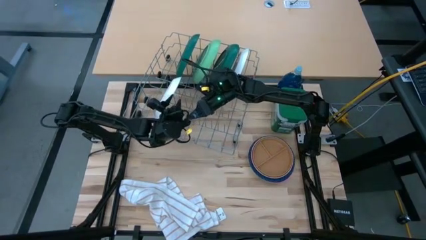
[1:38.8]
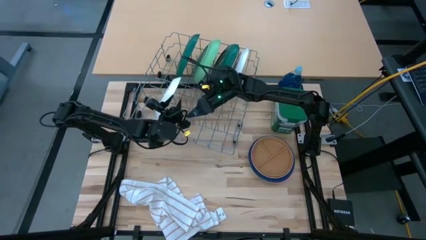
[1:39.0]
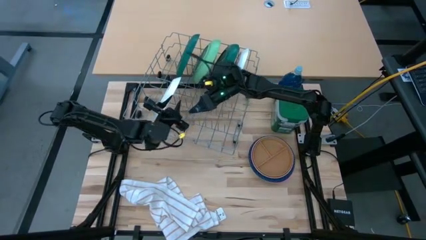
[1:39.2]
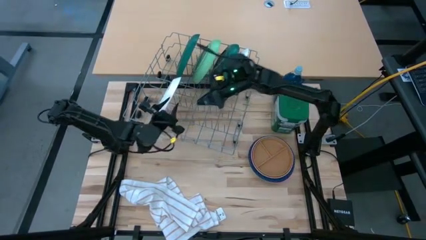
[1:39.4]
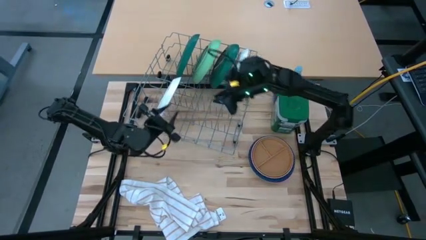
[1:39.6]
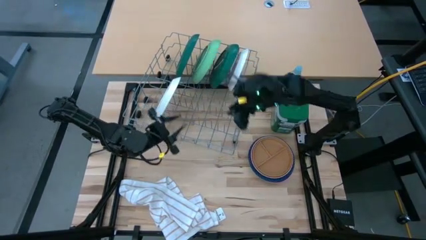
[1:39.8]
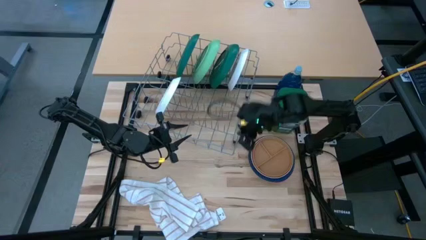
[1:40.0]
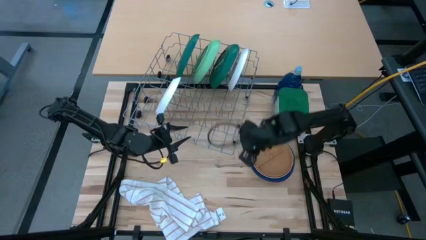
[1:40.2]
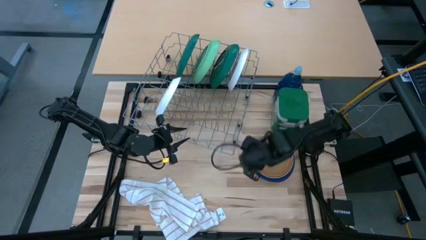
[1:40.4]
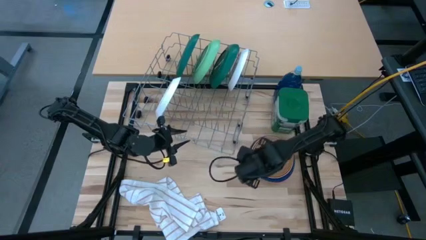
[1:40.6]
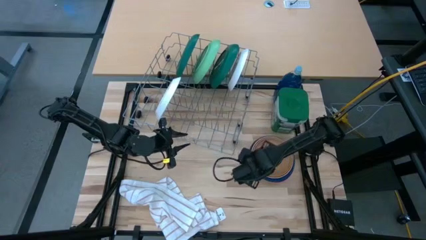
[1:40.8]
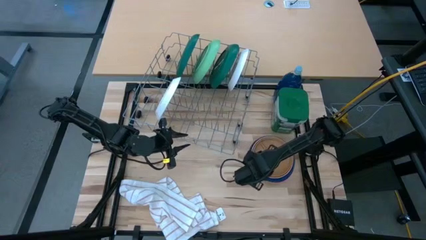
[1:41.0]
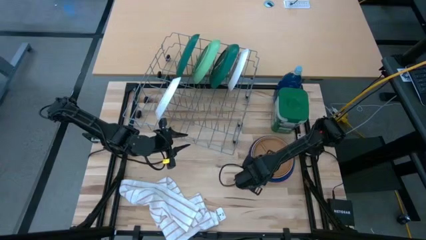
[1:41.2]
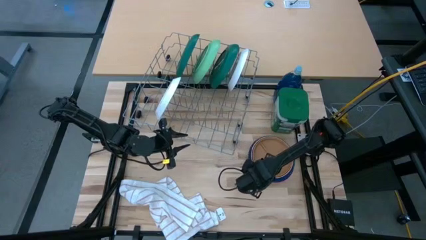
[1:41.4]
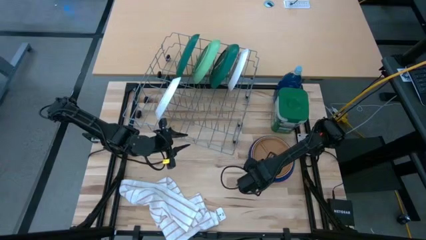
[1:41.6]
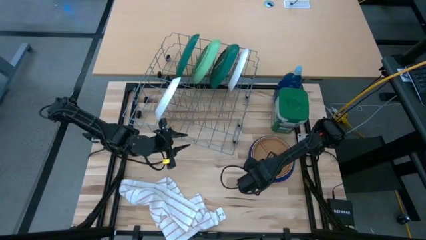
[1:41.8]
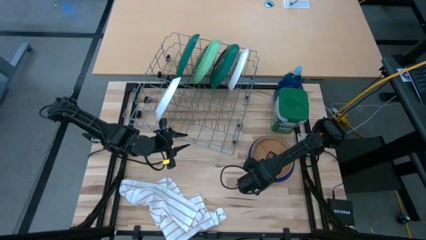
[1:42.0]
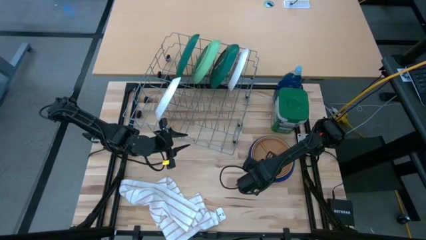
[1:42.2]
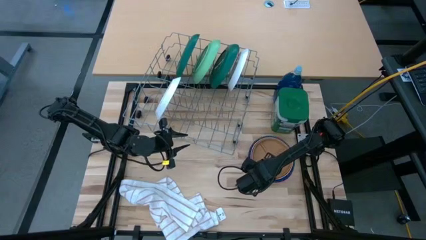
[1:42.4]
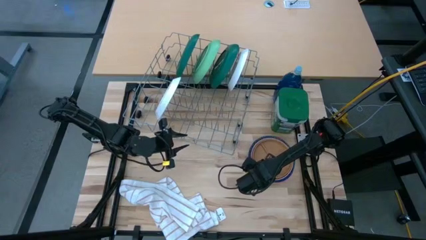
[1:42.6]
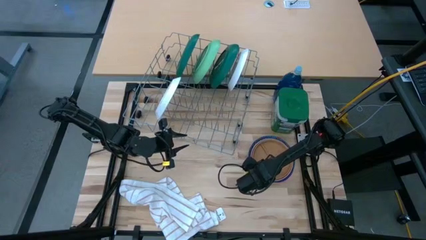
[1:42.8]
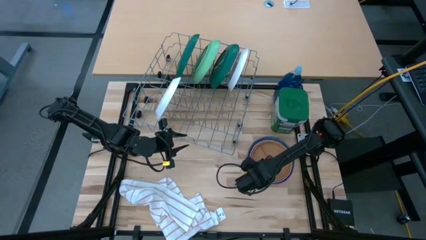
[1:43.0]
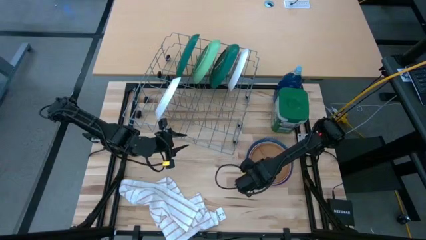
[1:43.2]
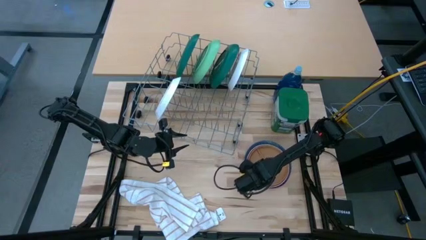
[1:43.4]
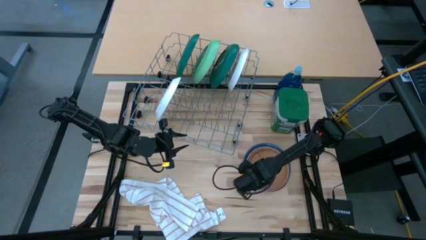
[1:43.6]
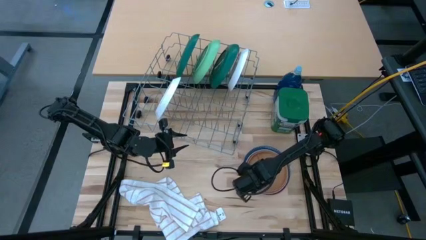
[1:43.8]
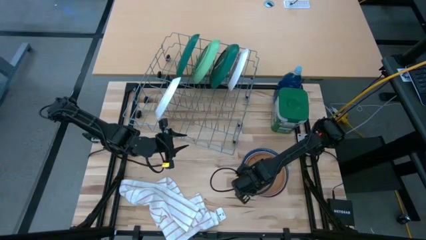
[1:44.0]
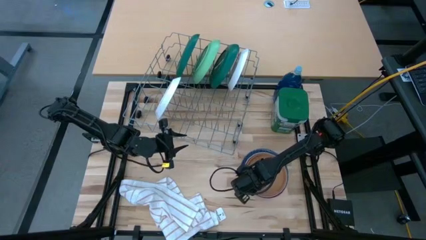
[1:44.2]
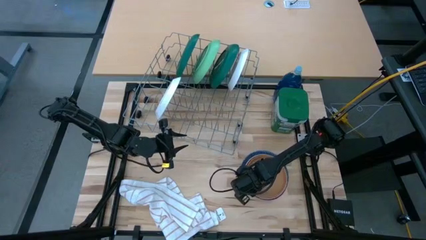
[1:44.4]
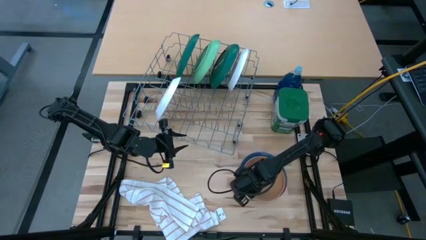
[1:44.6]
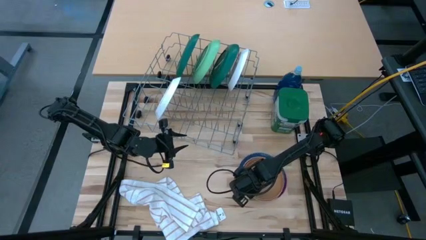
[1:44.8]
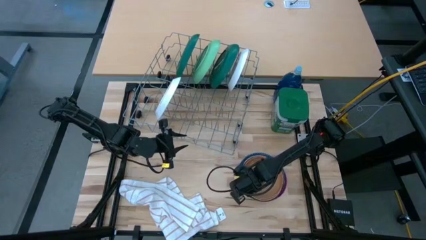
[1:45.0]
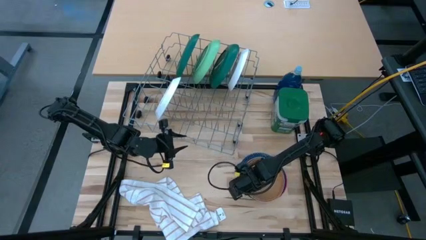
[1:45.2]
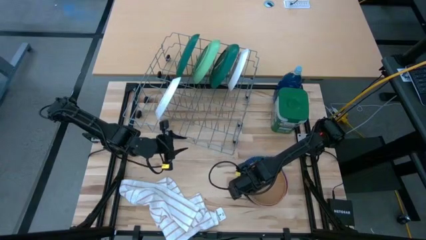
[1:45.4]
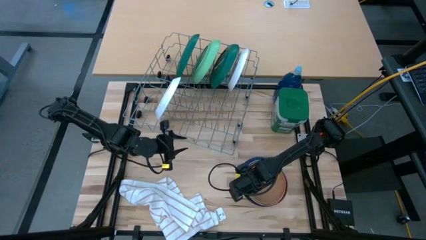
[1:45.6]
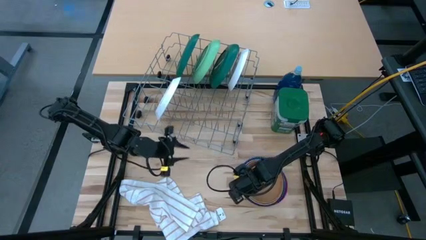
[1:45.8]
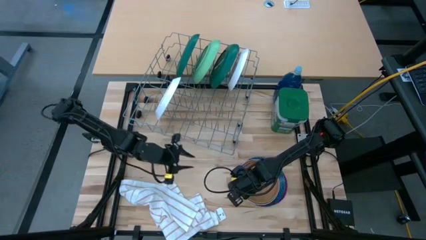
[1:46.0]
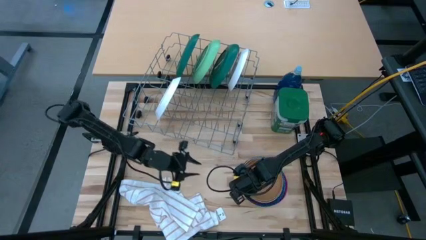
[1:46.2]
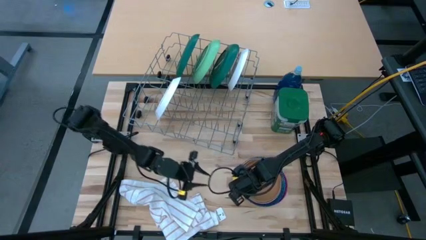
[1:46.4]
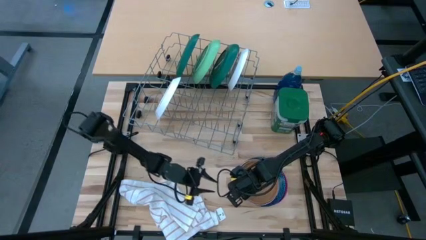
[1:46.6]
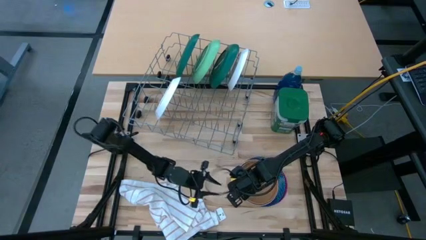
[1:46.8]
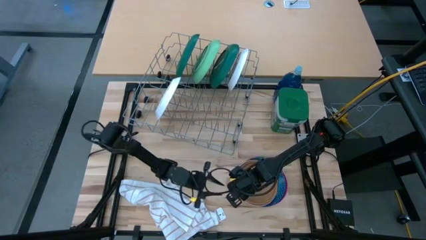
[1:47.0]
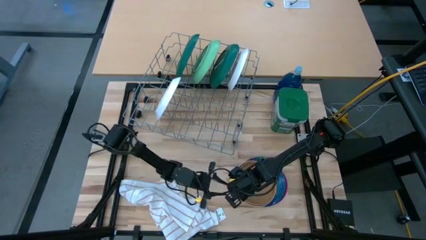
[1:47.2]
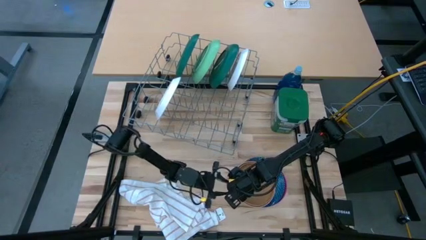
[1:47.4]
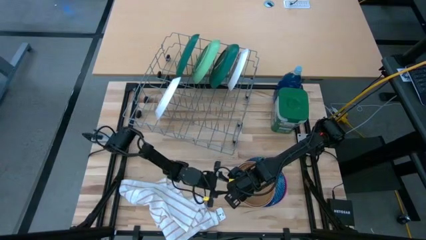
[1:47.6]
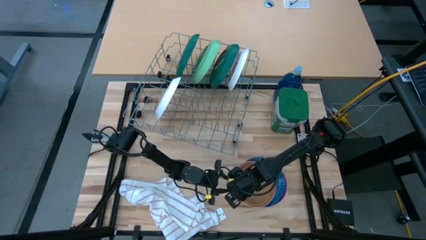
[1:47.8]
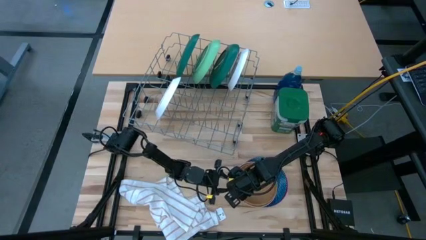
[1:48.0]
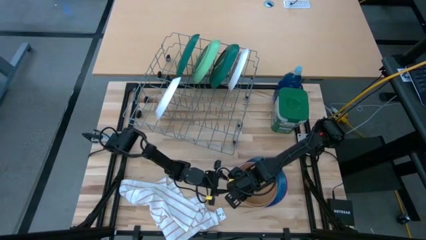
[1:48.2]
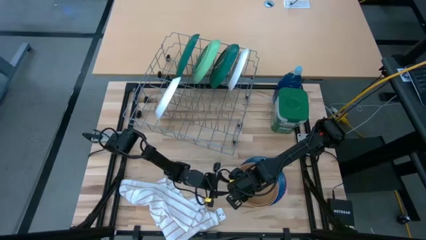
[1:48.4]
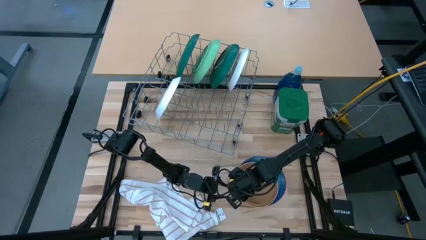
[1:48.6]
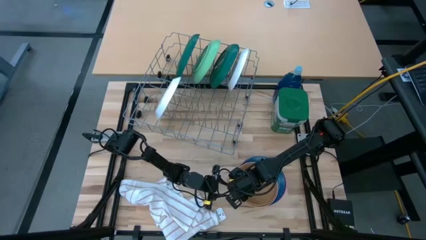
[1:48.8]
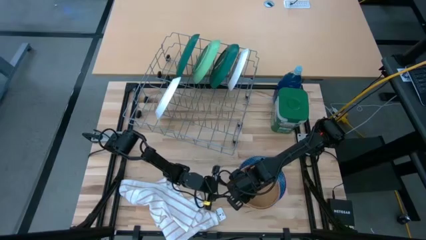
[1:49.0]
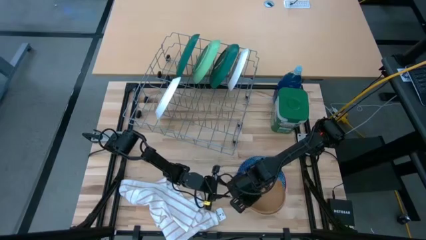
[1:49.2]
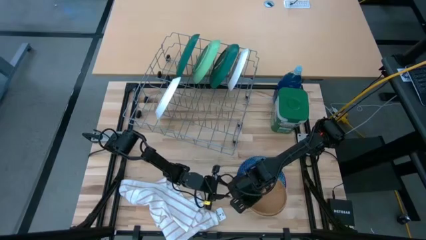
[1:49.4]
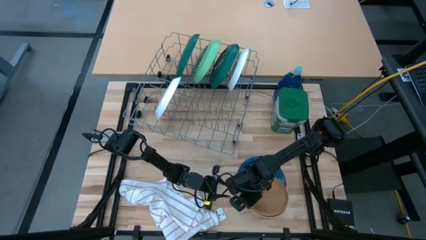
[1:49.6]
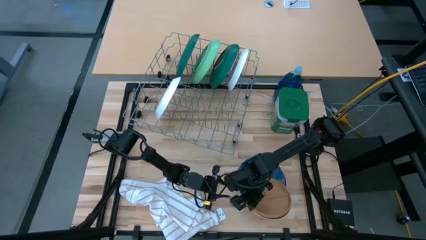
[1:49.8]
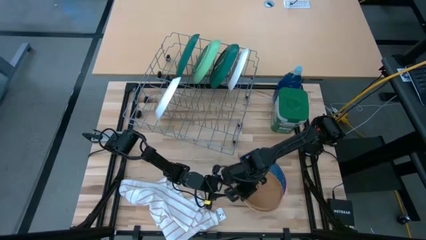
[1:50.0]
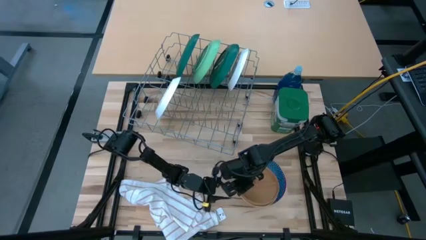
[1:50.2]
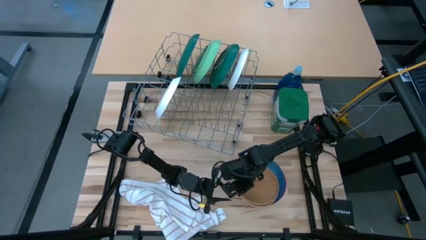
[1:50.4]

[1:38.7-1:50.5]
Task: Sort dishes
Put the brown plate in the dish rack

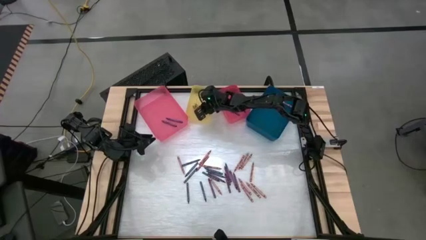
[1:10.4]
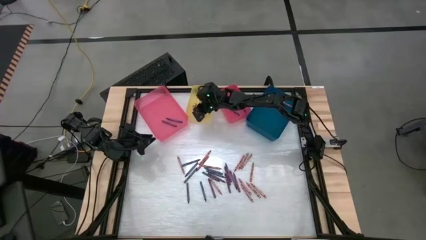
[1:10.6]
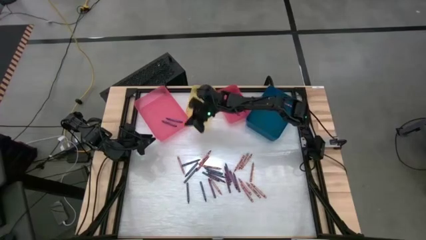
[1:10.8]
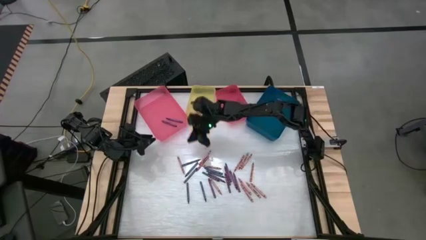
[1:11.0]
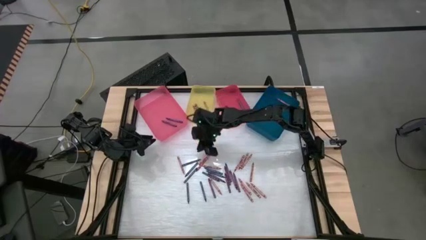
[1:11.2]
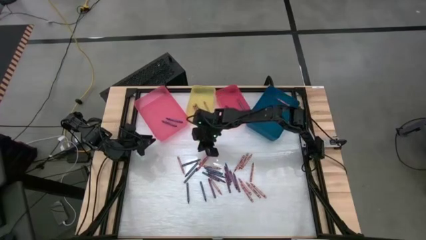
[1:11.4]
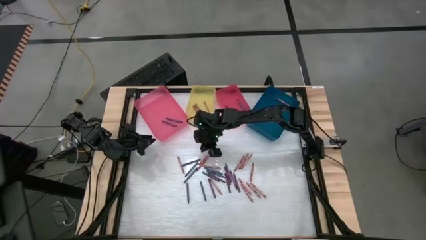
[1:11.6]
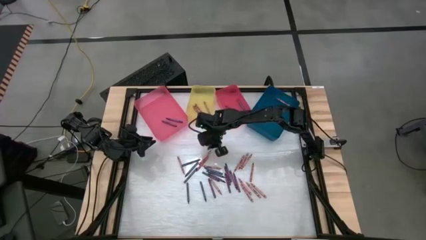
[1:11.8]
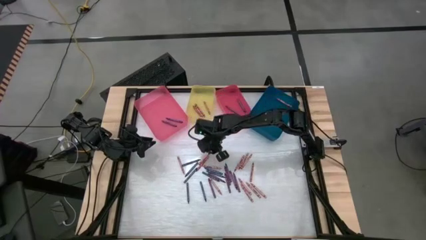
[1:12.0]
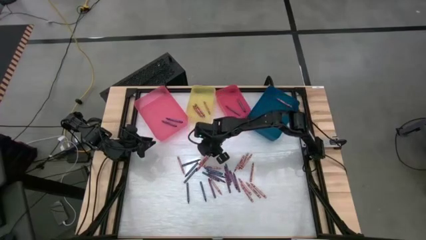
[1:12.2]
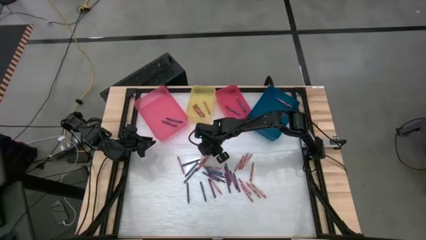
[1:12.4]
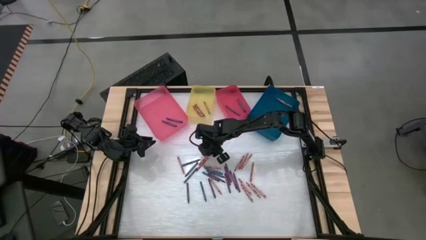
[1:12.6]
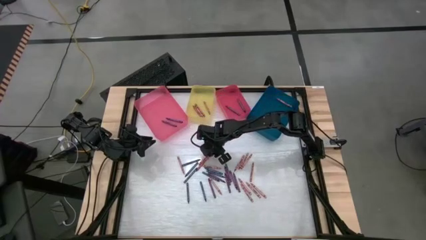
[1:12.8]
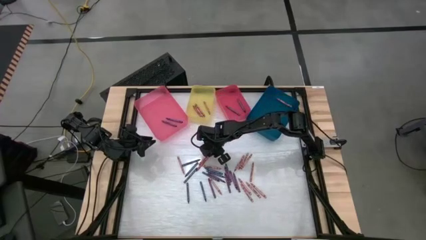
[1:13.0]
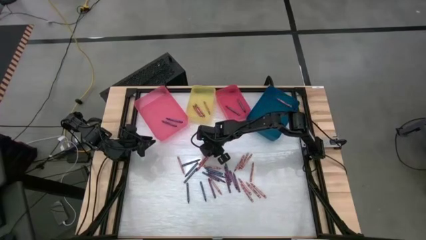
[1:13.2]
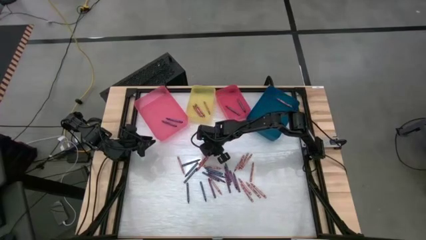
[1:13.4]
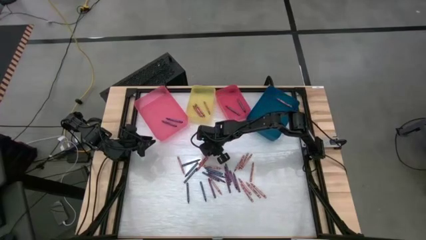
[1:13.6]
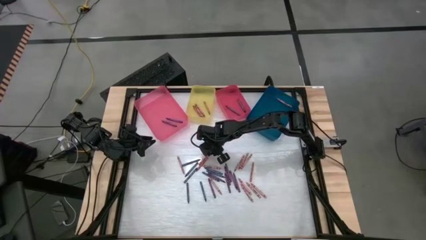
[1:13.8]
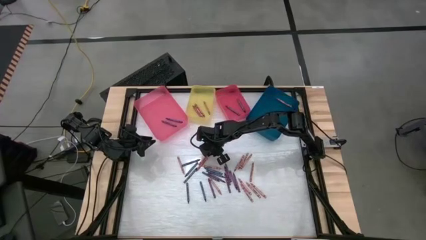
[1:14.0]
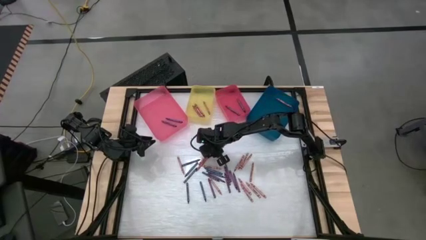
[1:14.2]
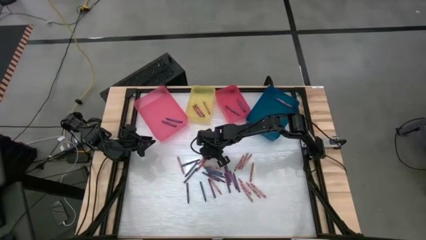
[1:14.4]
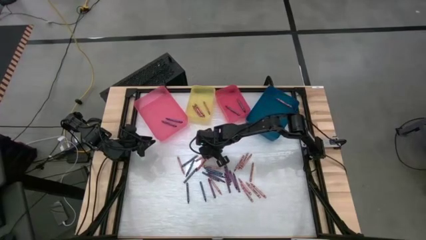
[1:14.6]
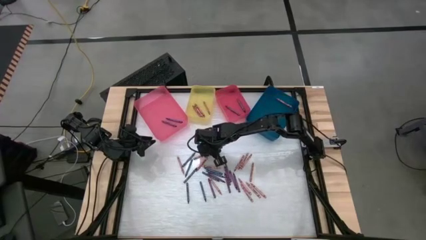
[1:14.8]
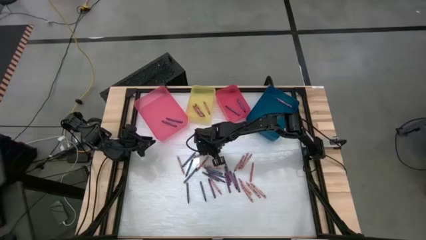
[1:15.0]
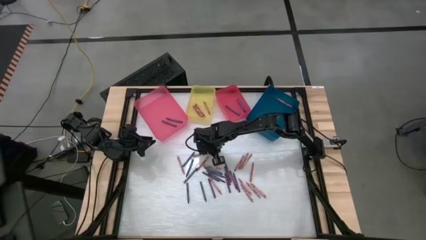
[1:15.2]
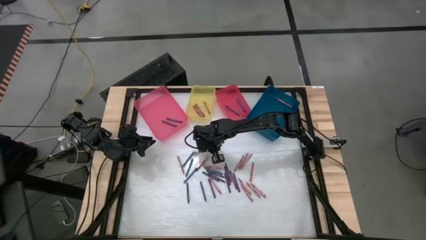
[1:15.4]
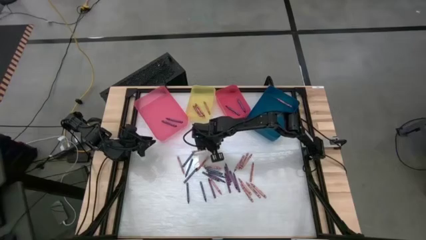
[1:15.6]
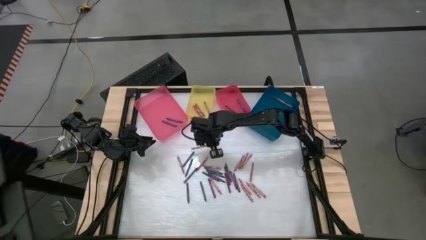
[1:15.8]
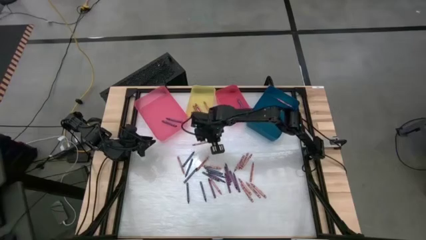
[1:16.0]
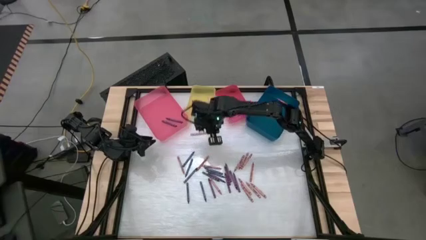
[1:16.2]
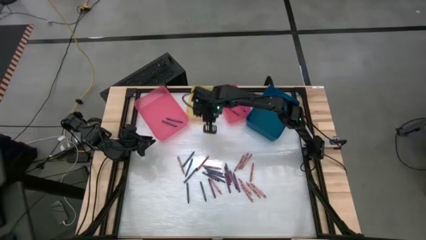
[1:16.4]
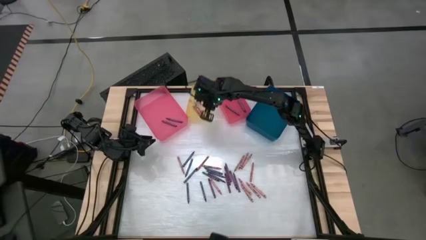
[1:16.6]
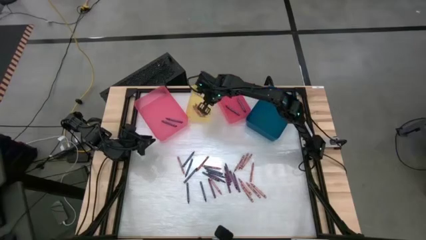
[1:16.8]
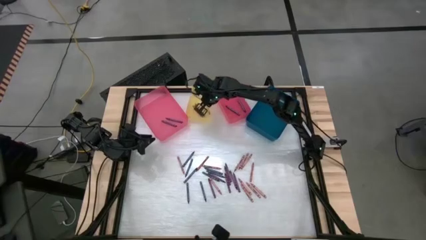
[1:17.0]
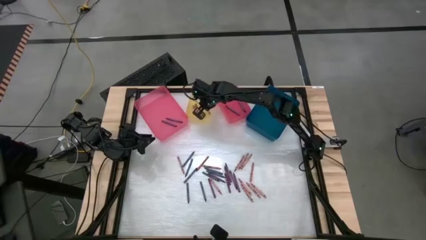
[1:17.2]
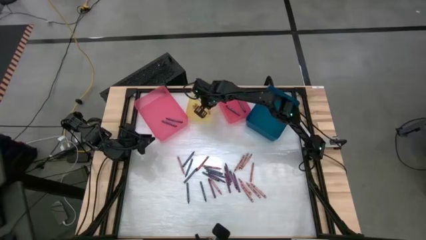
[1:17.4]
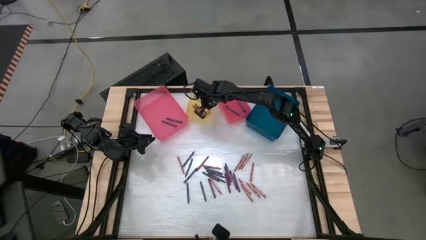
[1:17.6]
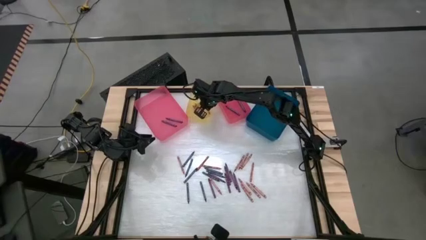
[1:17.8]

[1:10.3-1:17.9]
Task: Sort crayons
Put the red crayon into the yellow bin
